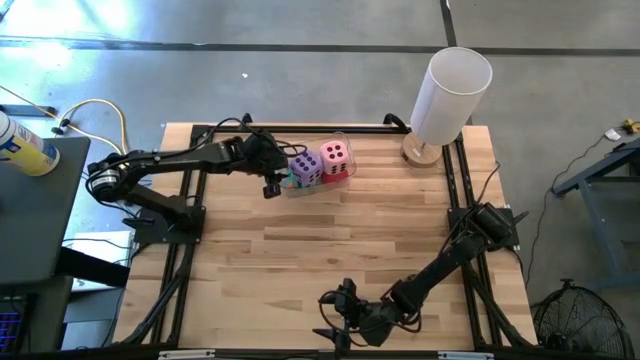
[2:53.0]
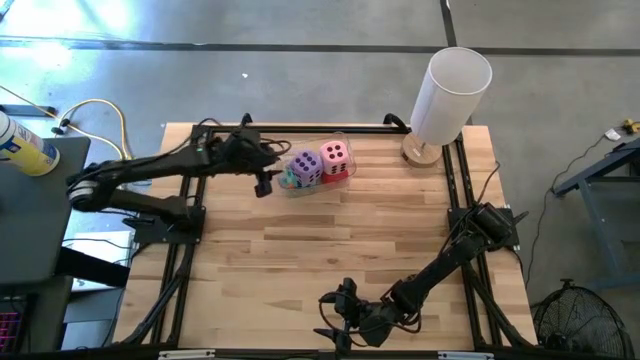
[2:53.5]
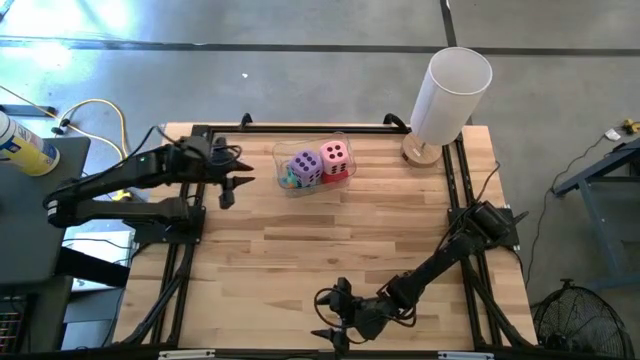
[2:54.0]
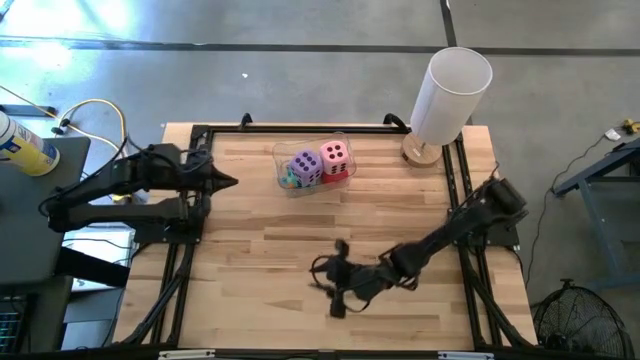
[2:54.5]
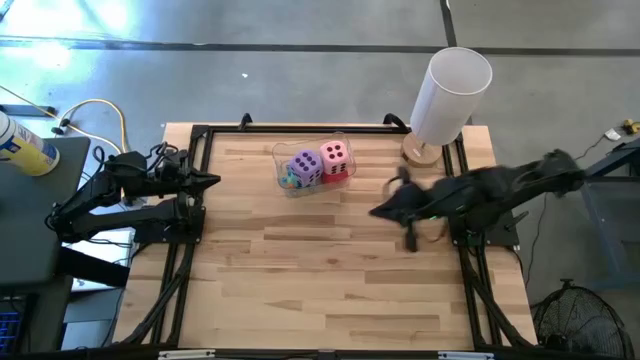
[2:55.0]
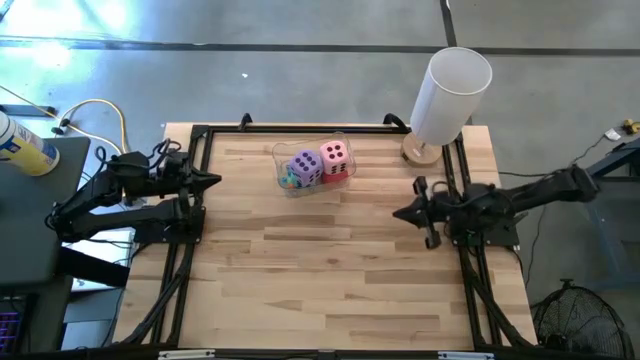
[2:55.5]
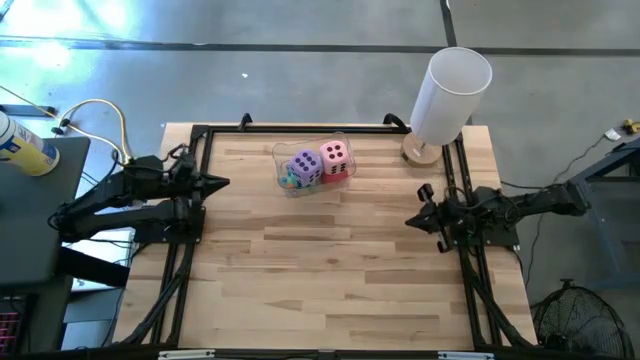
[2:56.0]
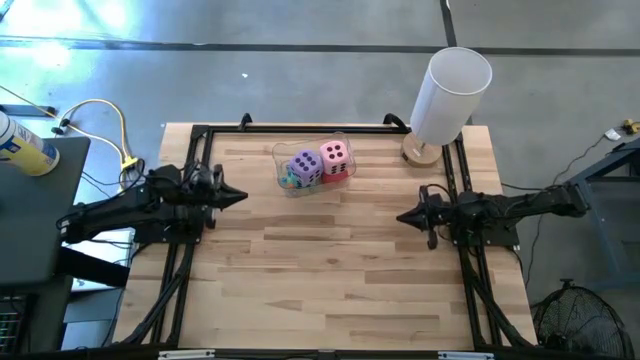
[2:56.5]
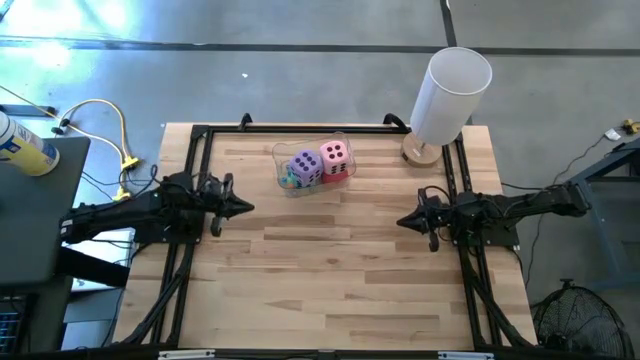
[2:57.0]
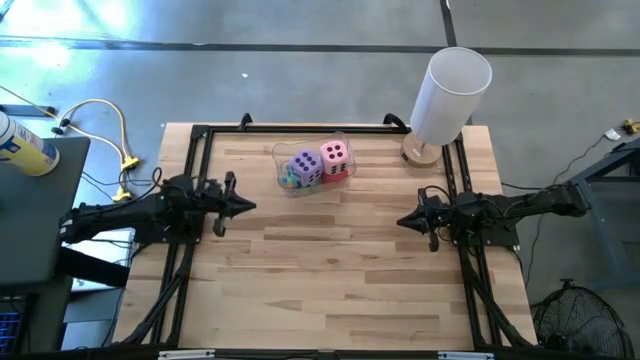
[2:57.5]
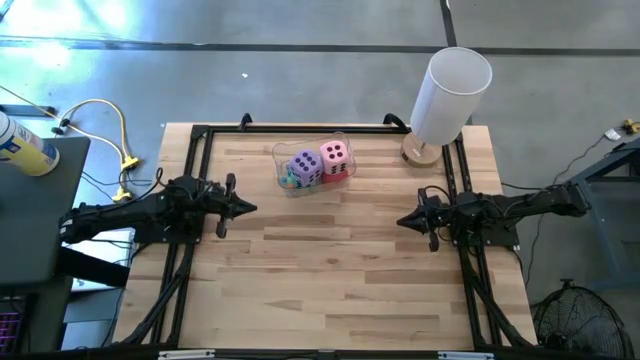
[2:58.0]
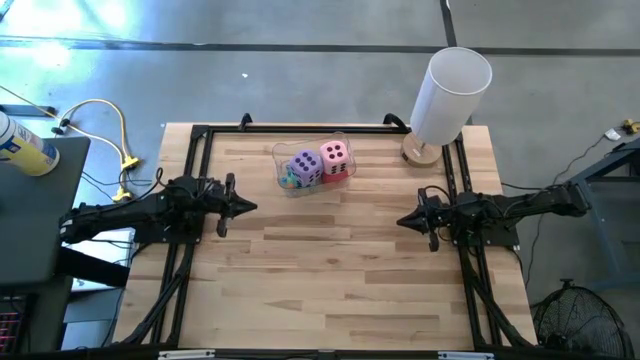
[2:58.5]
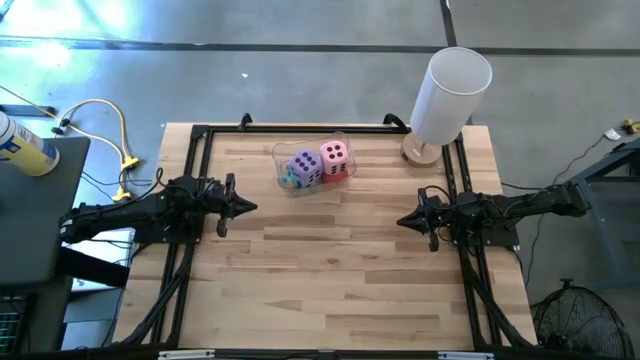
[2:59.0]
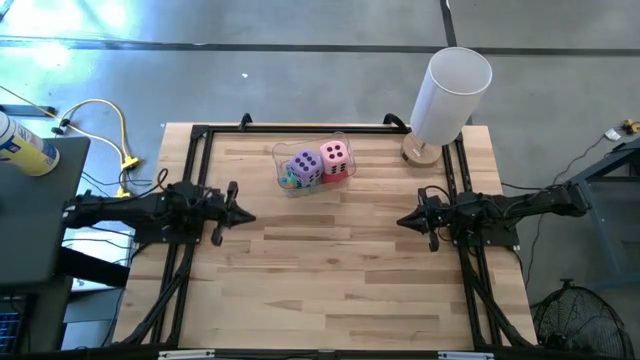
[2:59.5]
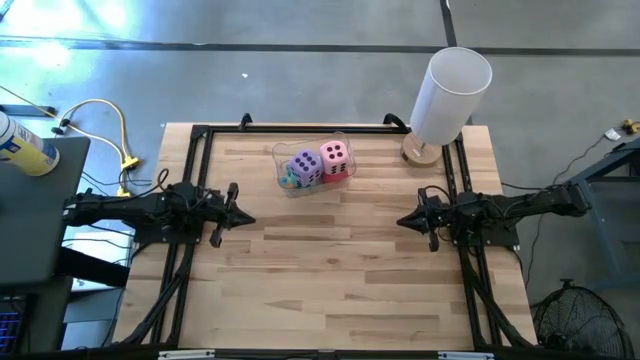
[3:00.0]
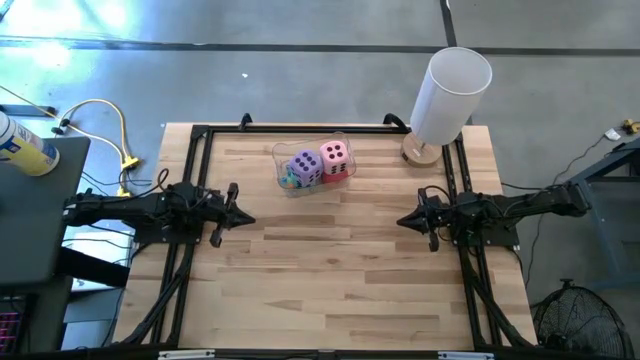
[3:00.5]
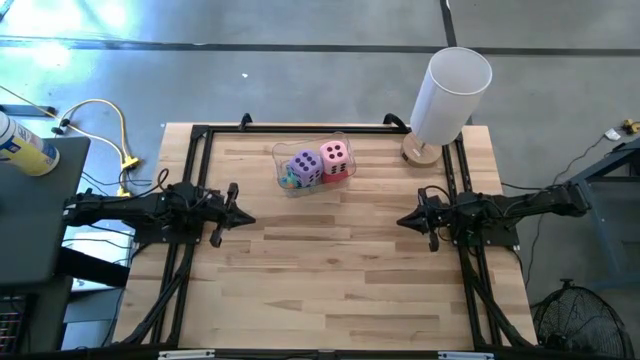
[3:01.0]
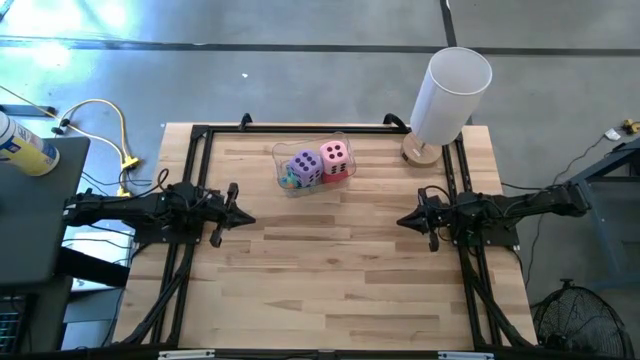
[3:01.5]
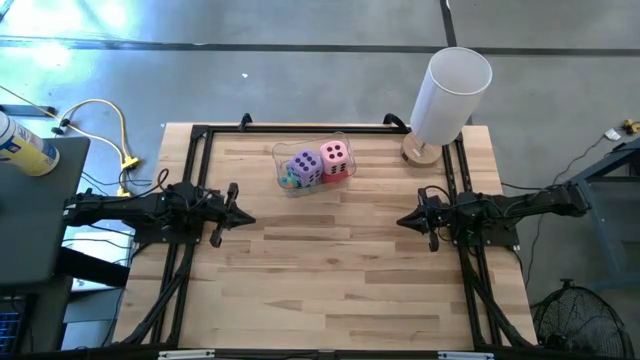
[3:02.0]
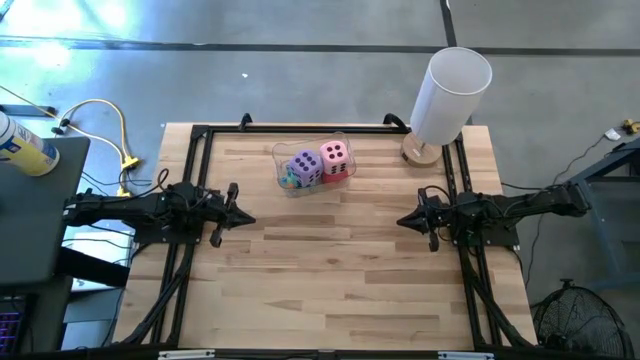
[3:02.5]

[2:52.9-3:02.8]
Task: Pick & Place Dice
Return to Home Position

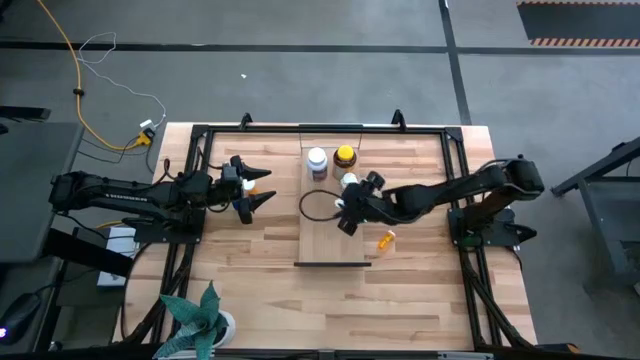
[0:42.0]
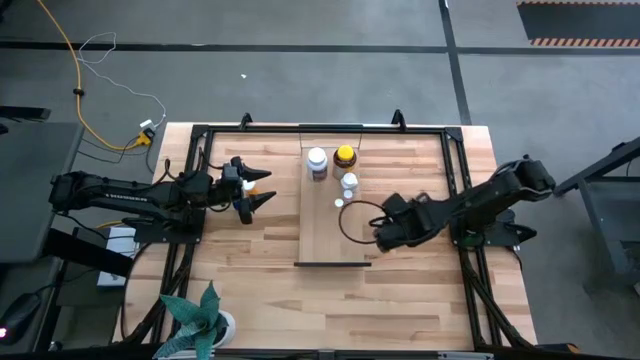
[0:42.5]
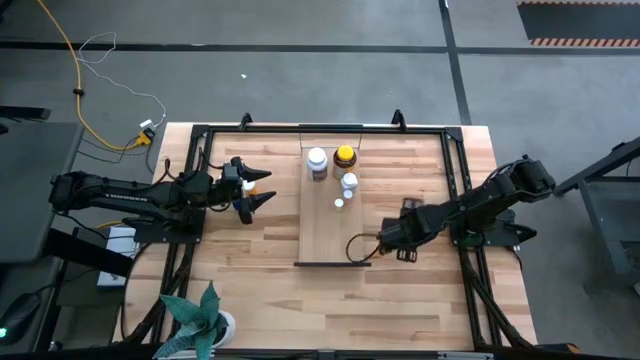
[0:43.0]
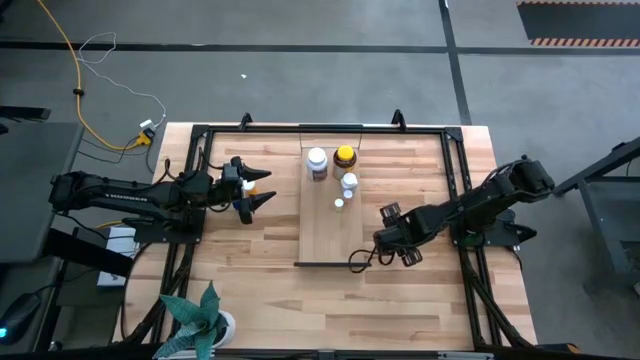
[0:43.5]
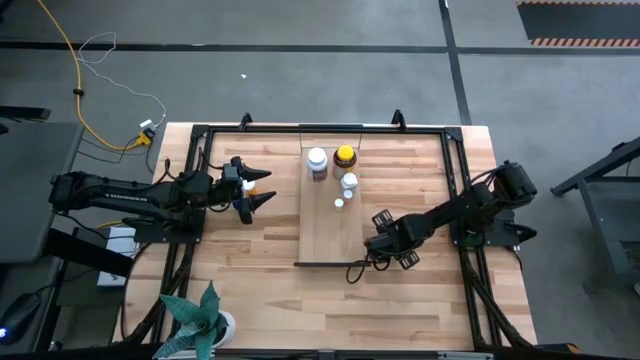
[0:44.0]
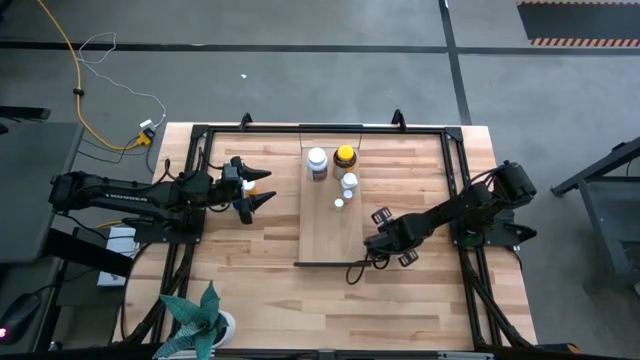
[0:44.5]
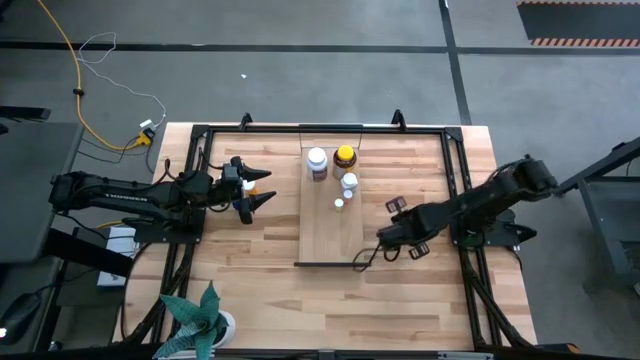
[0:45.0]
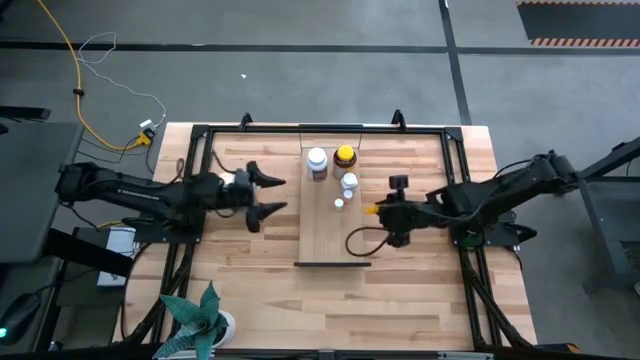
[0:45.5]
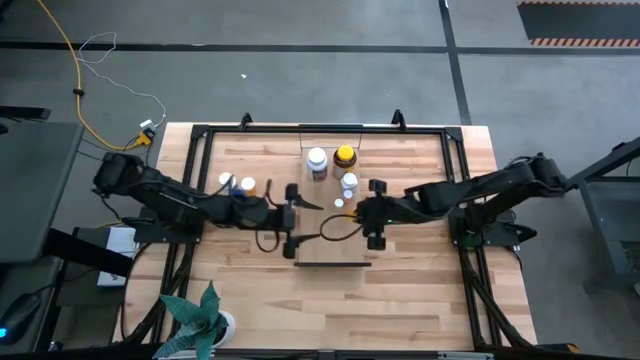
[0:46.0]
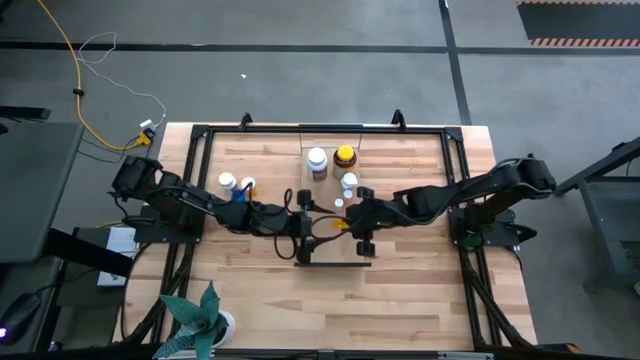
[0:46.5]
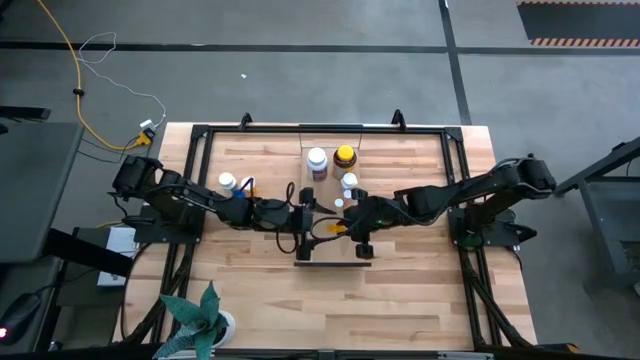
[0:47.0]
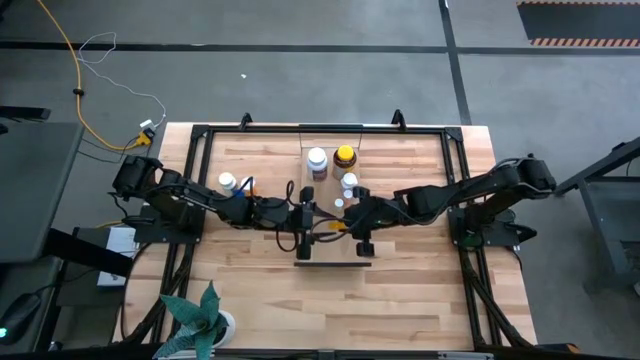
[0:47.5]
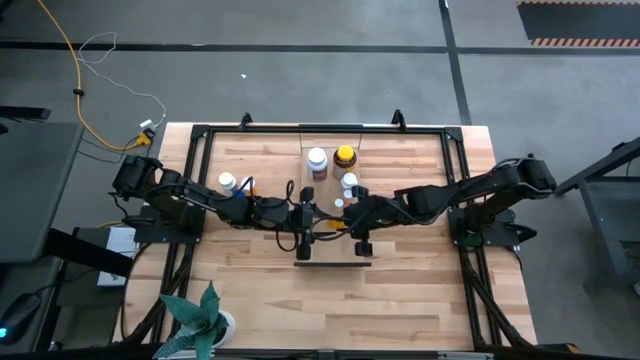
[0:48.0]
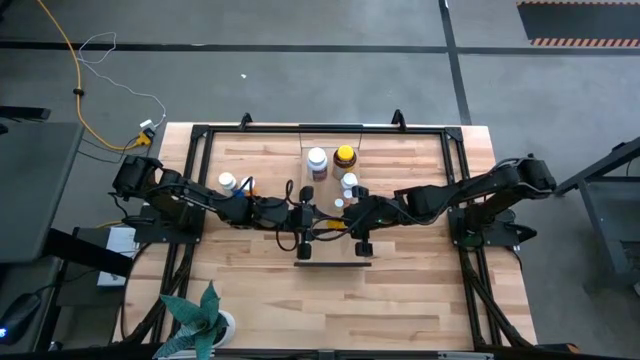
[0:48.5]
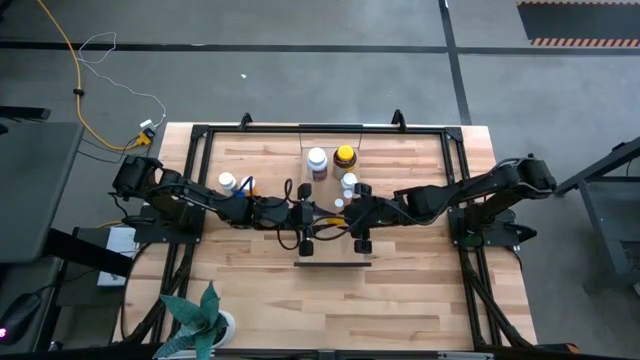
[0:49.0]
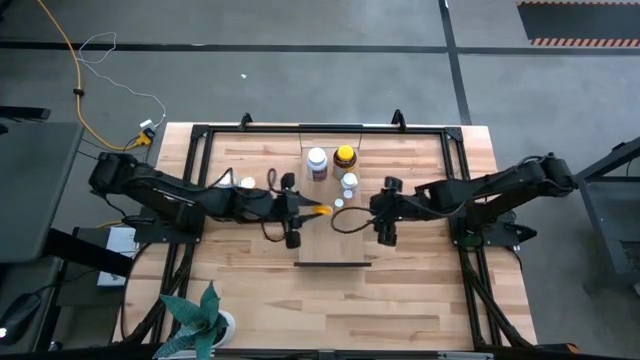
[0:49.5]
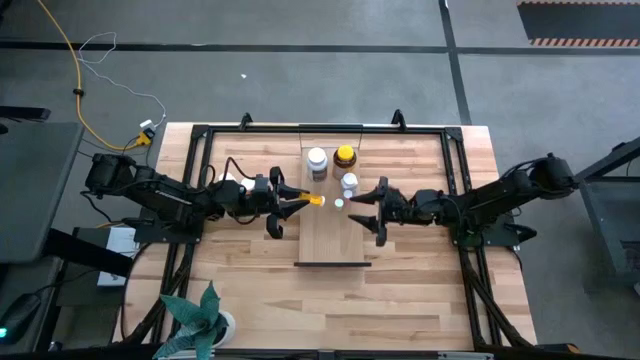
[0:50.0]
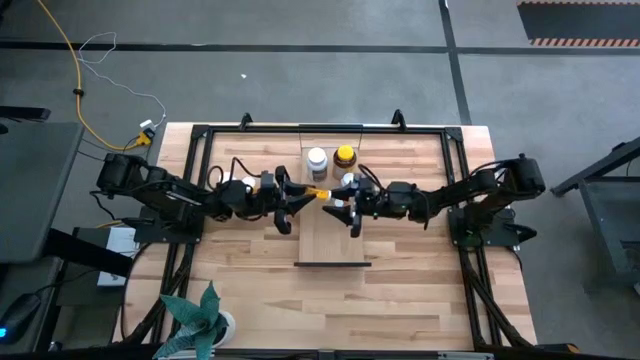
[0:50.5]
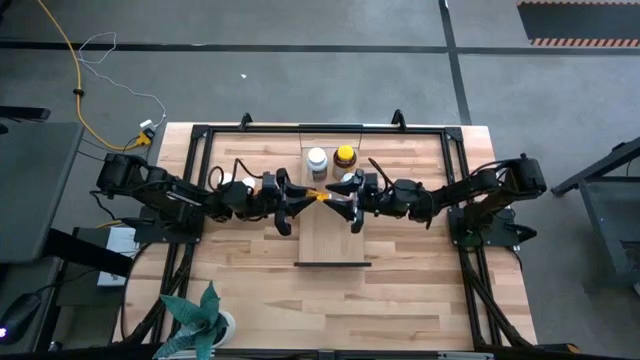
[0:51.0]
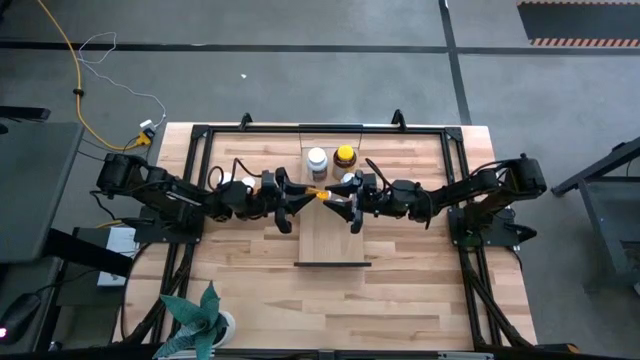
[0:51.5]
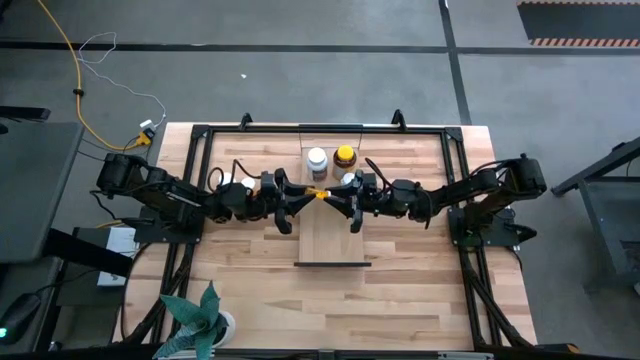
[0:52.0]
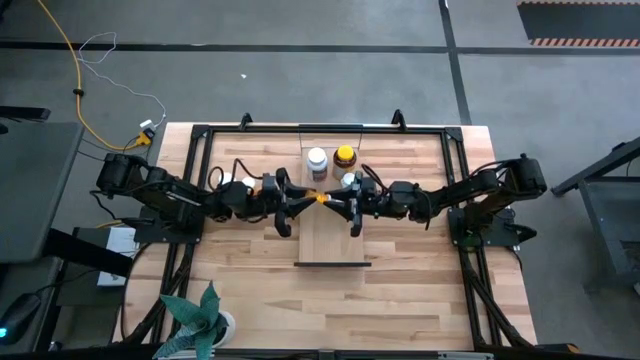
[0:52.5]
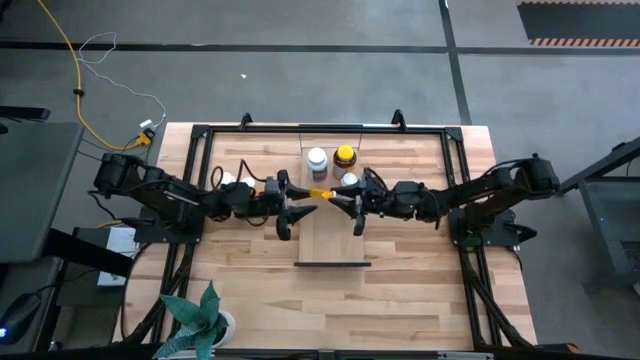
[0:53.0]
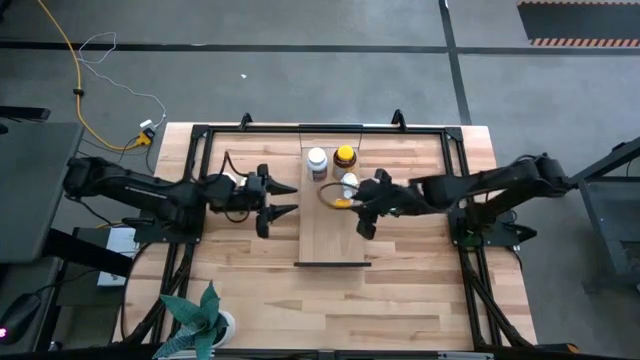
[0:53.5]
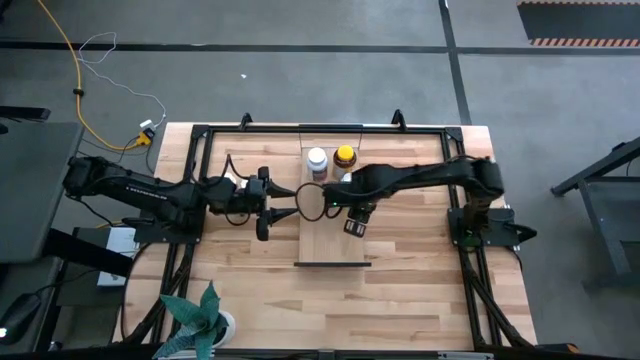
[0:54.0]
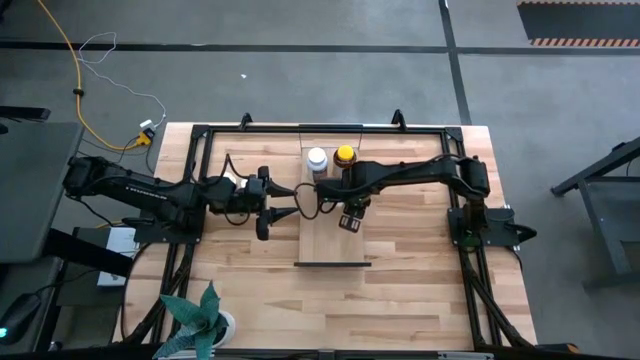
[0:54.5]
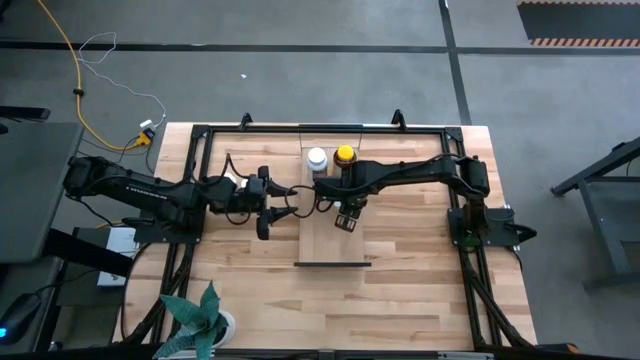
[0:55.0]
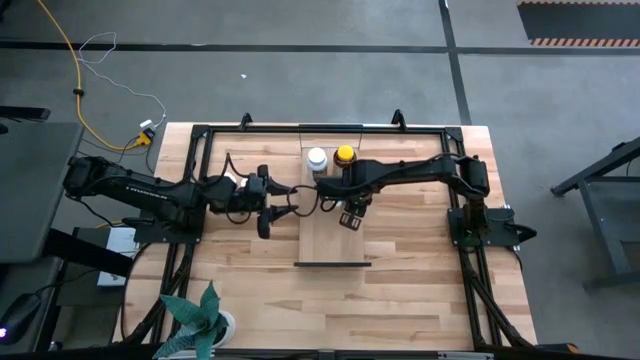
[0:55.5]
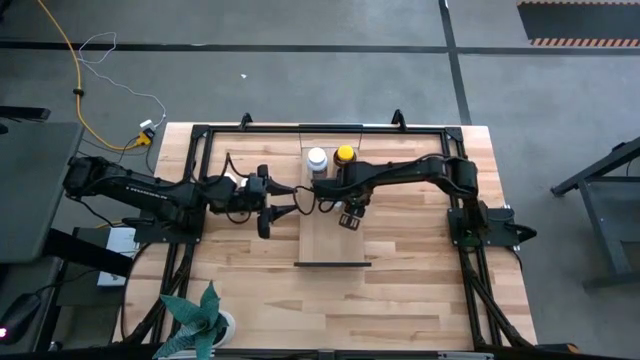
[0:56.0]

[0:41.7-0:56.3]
Task: Pick and place medicine bottles onto shelf by color
Put the small orange pill bottle on the shelf
